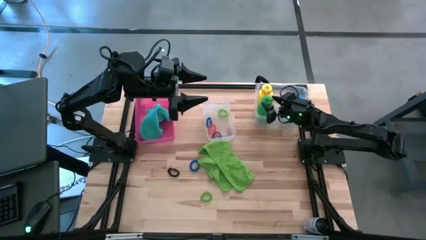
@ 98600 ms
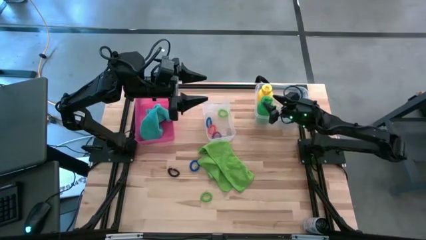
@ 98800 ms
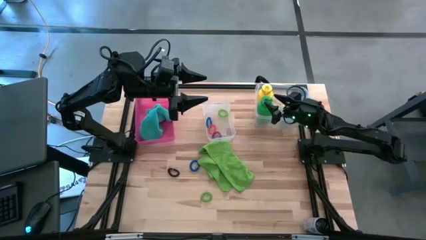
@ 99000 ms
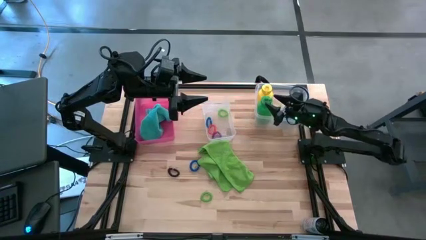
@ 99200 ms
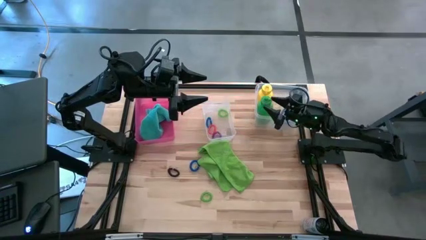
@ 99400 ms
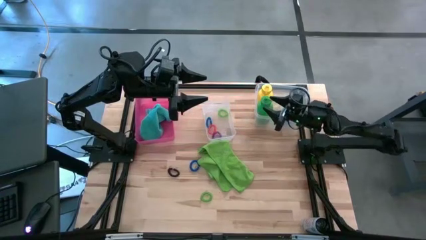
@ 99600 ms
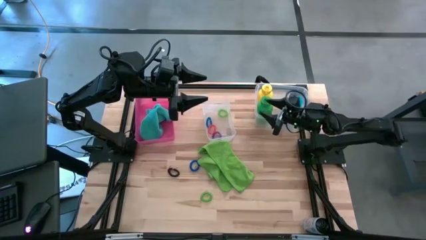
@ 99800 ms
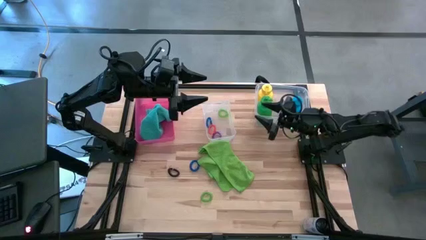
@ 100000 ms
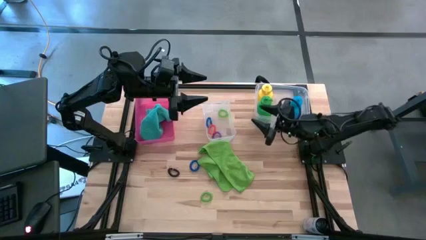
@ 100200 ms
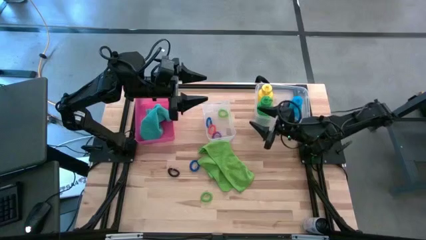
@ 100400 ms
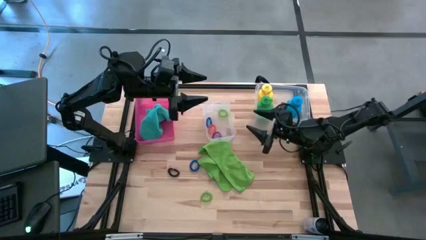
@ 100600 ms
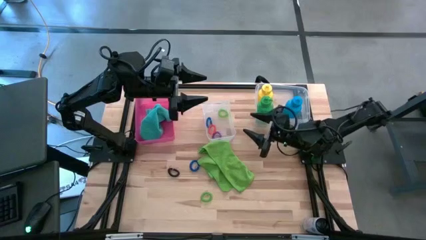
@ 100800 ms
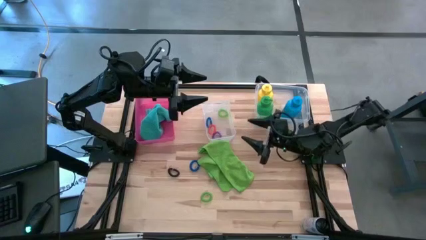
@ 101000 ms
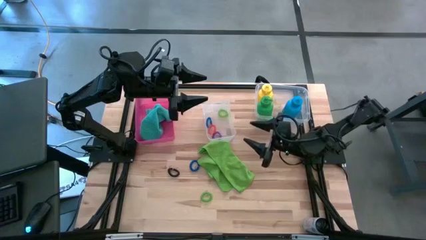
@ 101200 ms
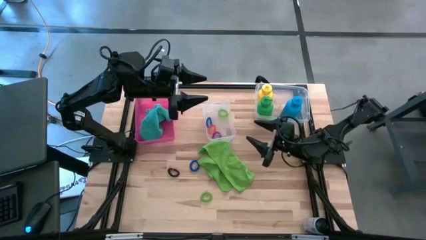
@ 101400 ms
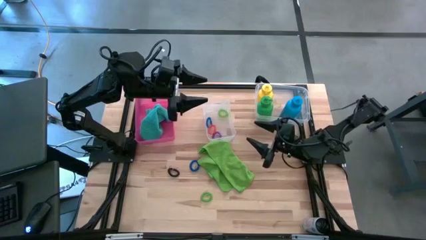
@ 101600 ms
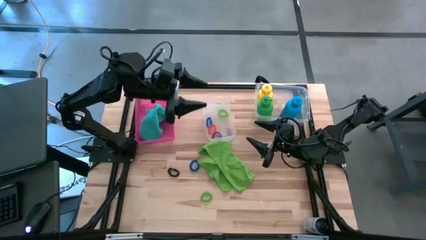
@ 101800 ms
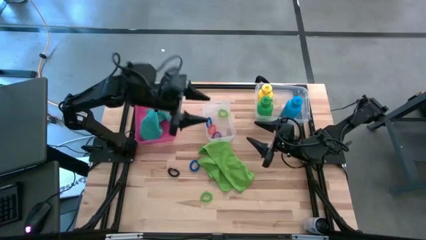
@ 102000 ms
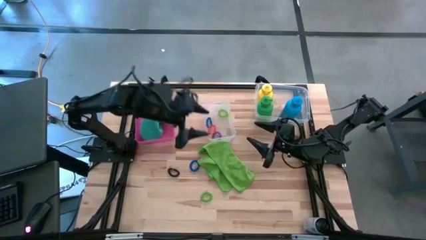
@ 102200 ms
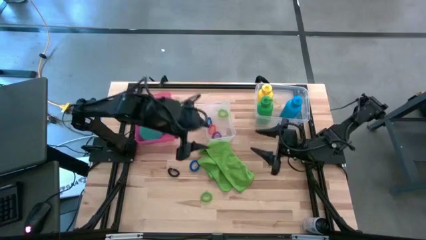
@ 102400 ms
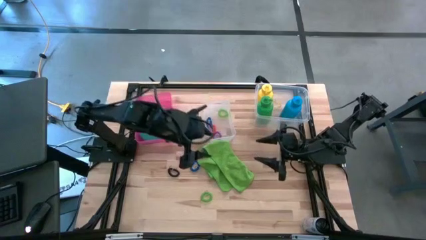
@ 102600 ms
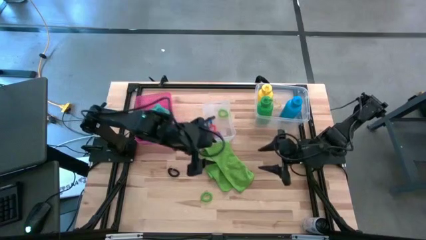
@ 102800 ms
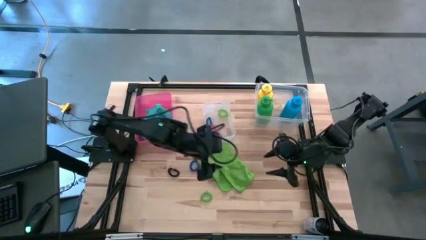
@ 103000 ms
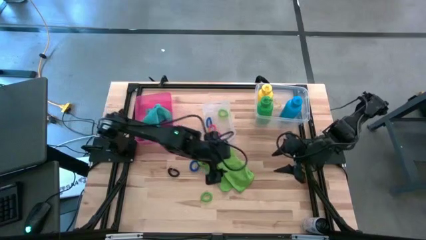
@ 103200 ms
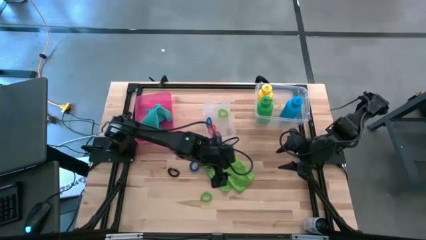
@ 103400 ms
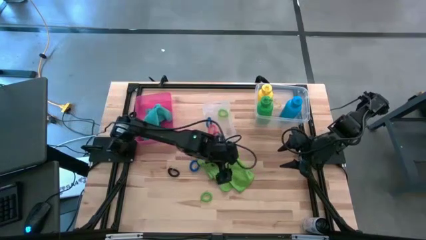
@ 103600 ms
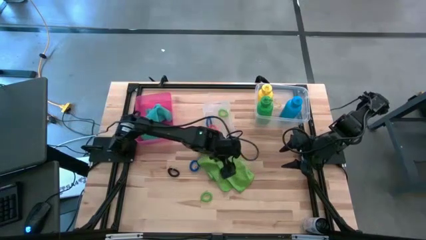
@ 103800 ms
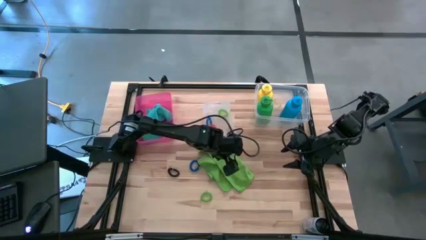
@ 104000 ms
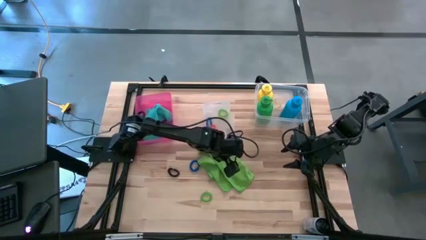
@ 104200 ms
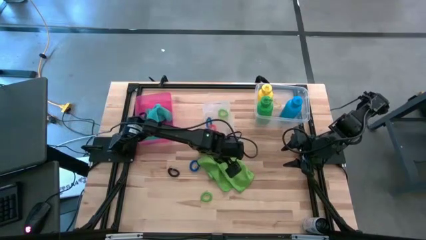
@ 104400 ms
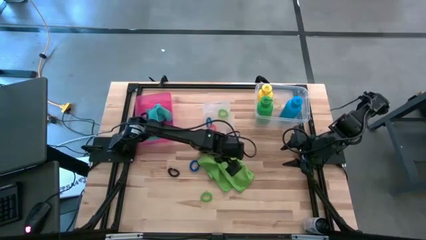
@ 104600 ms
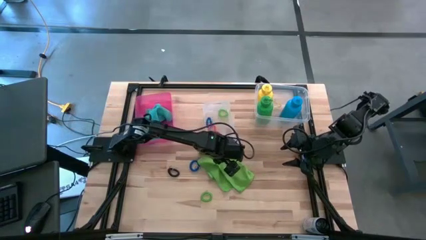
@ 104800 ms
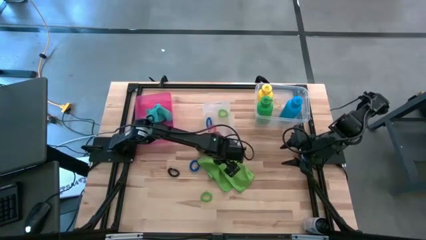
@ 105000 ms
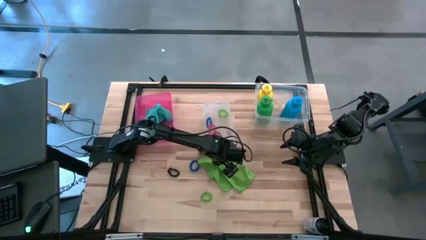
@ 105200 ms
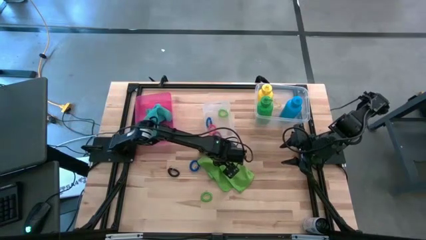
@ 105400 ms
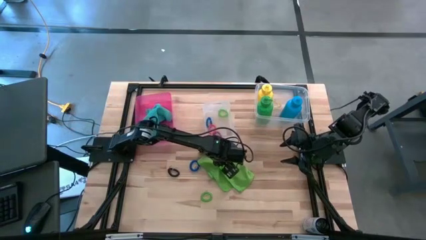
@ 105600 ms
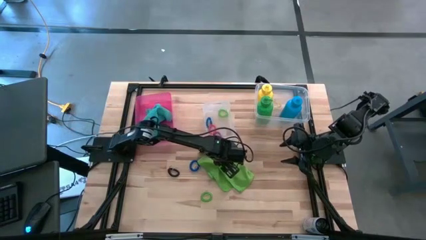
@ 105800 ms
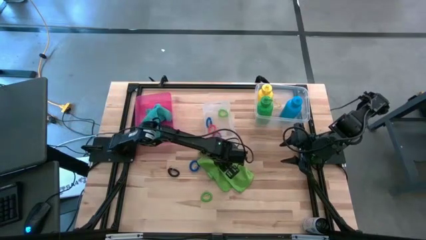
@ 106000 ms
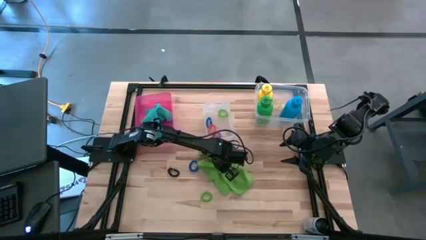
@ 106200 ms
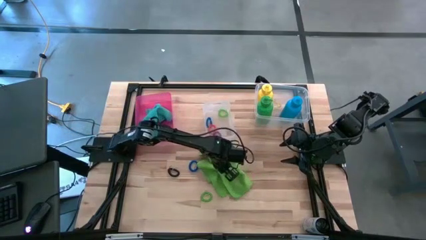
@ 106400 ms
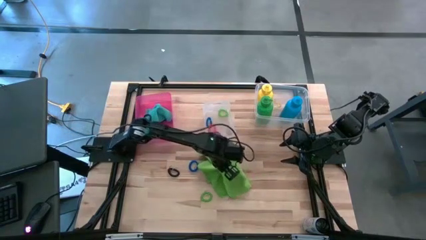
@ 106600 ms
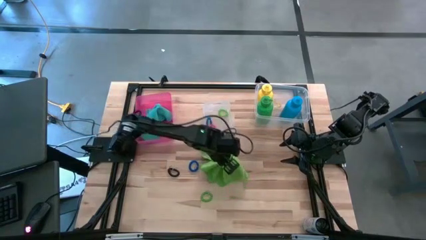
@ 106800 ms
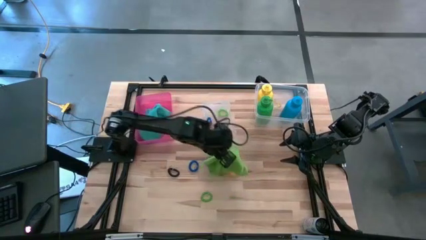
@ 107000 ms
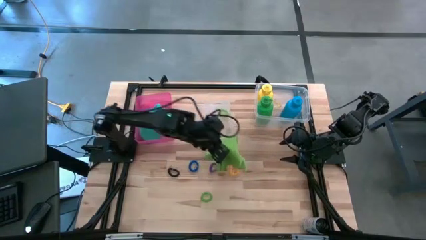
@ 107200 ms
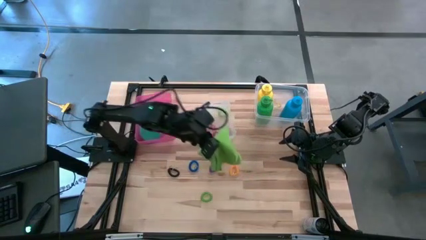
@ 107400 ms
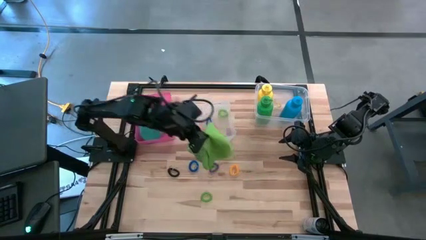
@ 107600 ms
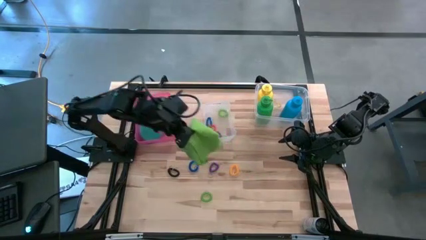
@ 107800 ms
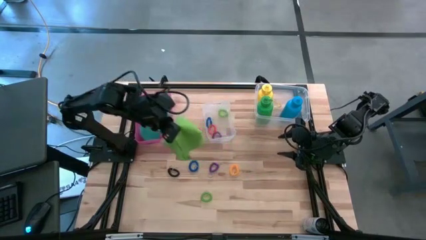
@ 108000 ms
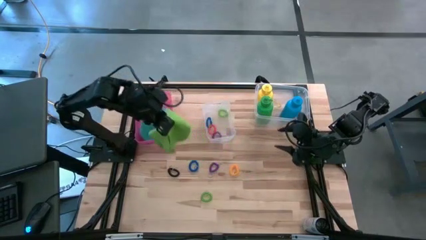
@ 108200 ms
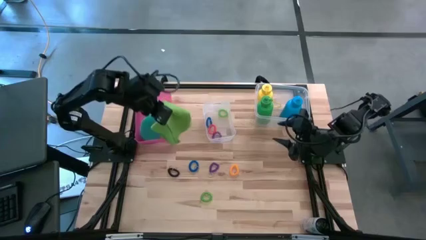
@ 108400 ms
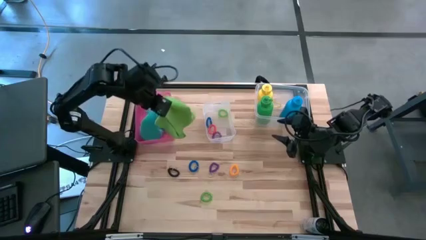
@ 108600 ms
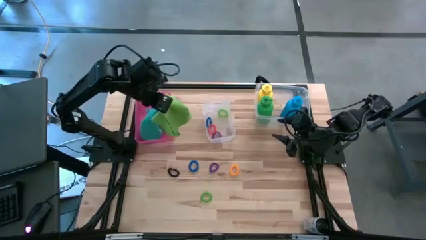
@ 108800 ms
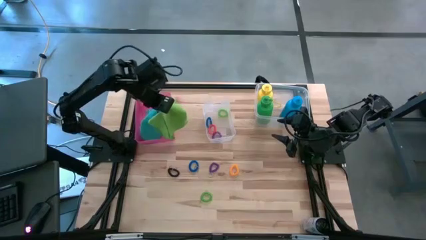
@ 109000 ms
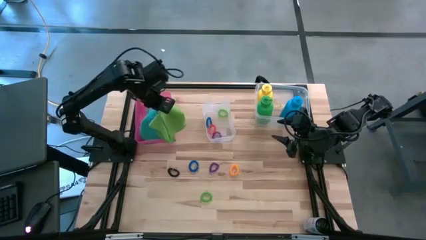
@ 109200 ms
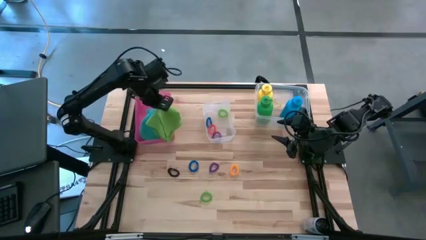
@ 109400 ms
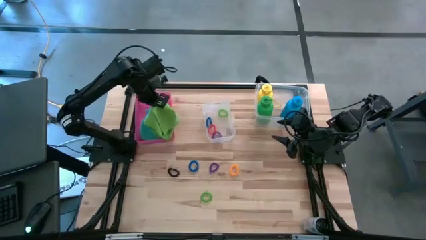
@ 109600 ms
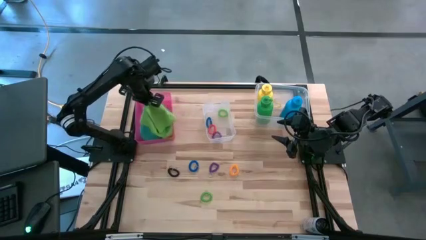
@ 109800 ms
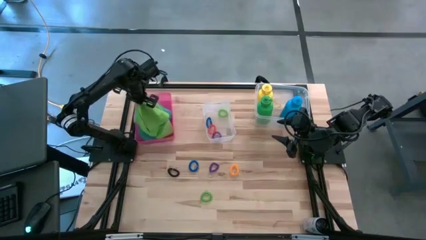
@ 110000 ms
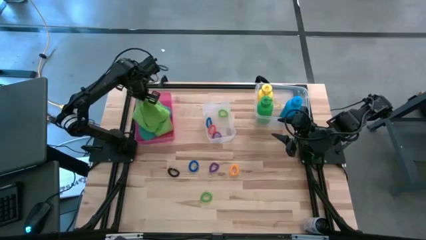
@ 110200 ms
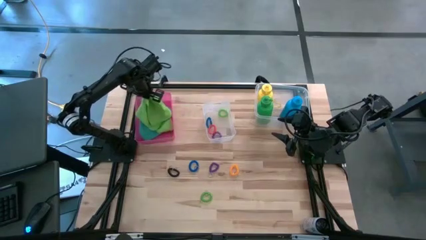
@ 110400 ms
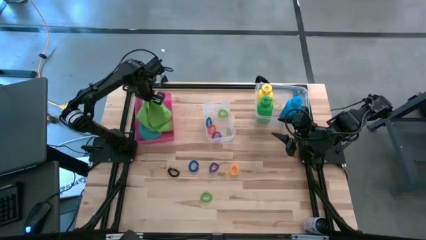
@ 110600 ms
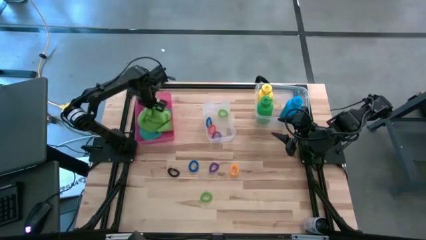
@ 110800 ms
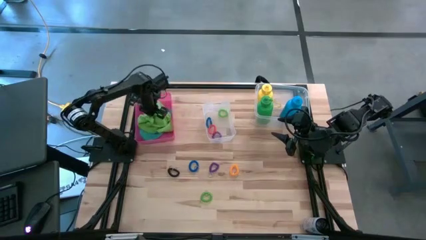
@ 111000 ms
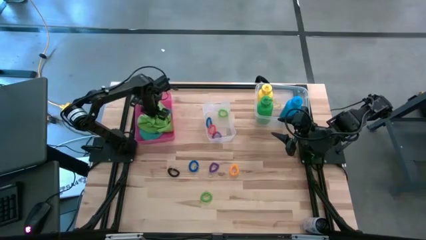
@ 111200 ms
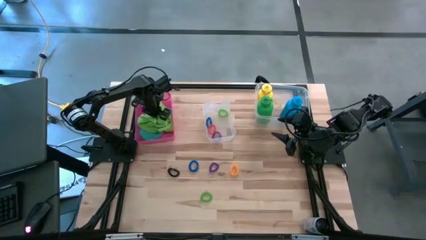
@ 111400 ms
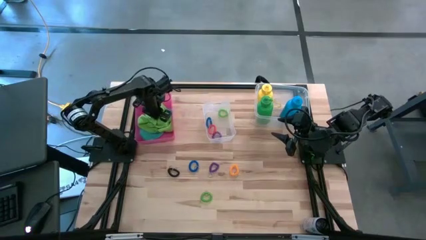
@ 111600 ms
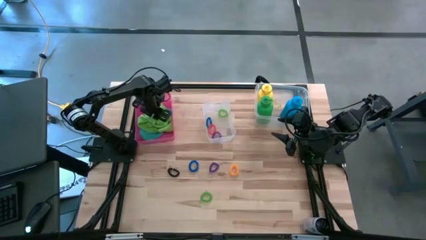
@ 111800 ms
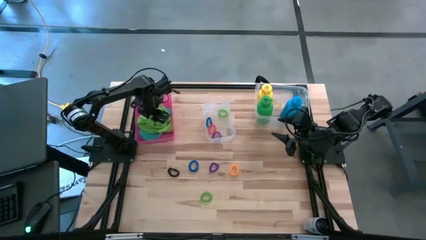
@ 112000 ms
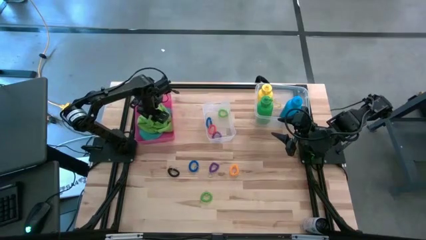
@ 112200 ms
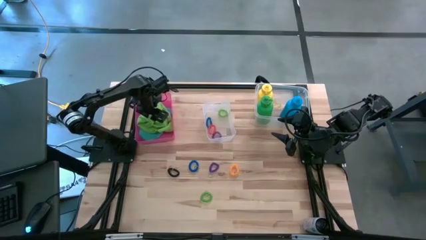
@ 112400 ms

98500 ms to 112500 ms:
Task: Pick & Place Sports Items
Put the green microfiber towel into the red bin

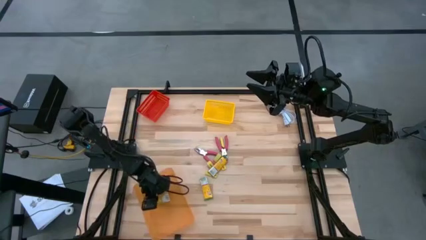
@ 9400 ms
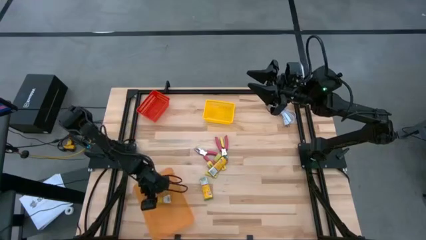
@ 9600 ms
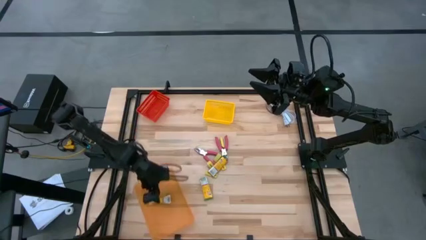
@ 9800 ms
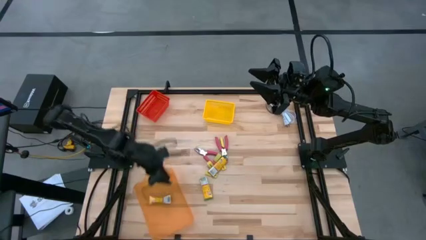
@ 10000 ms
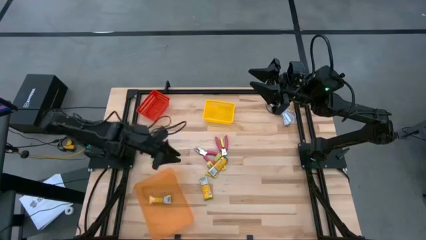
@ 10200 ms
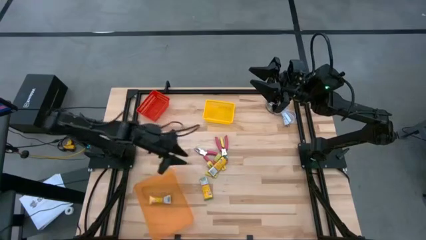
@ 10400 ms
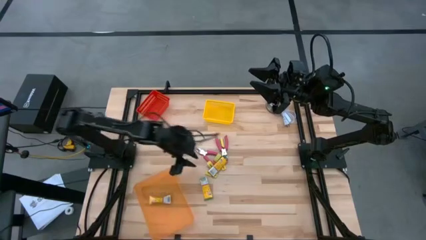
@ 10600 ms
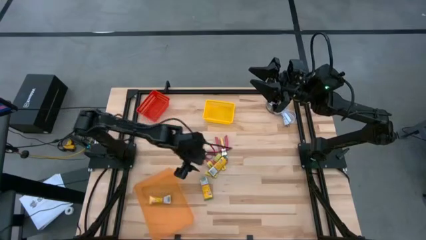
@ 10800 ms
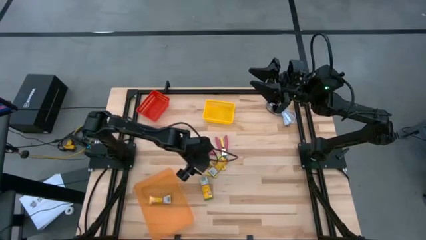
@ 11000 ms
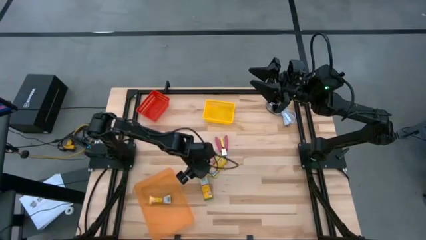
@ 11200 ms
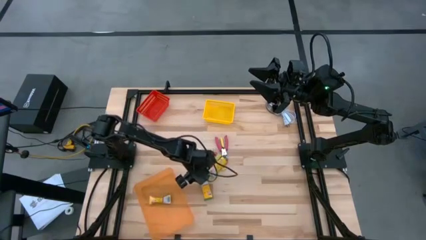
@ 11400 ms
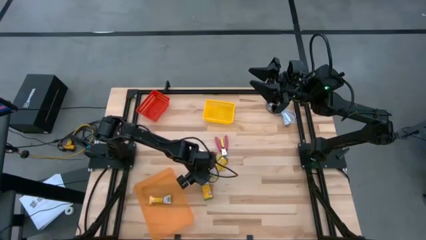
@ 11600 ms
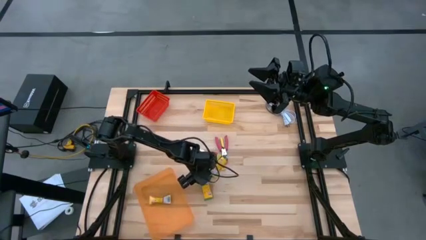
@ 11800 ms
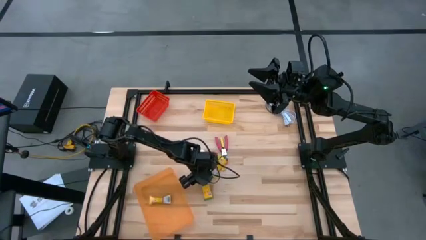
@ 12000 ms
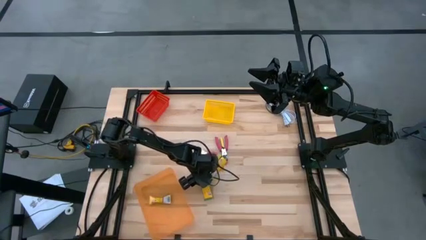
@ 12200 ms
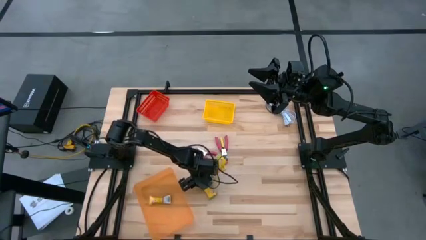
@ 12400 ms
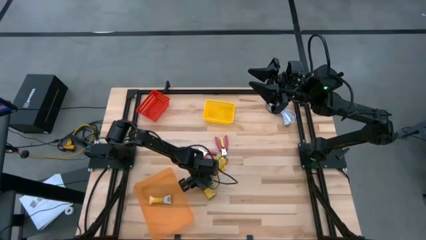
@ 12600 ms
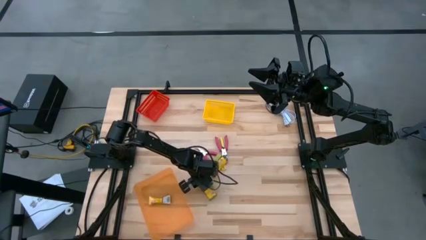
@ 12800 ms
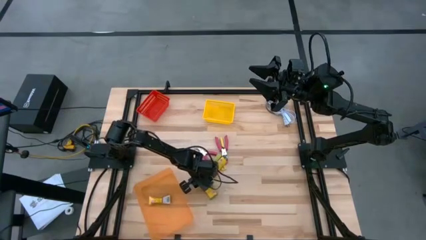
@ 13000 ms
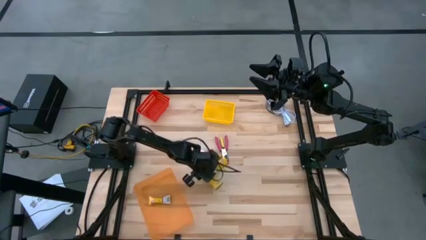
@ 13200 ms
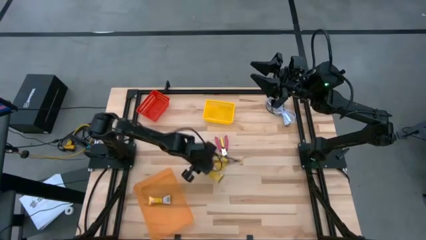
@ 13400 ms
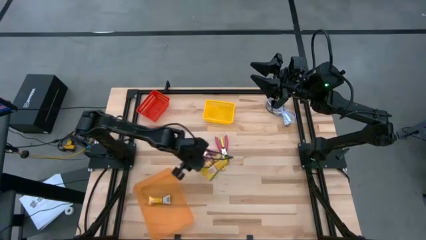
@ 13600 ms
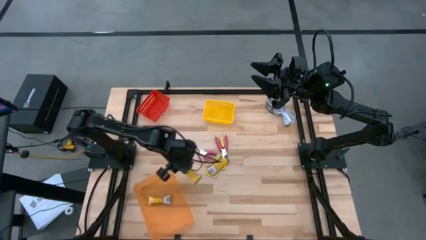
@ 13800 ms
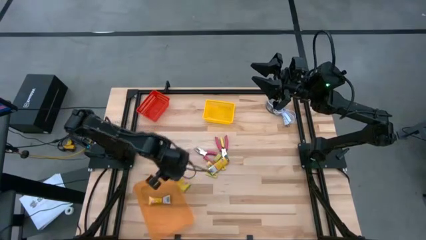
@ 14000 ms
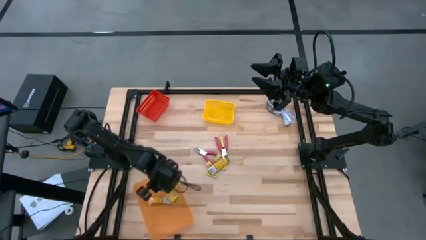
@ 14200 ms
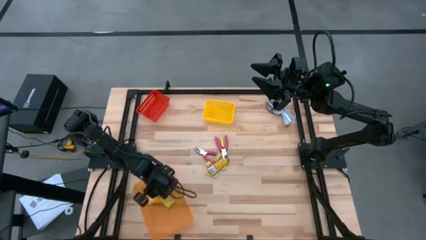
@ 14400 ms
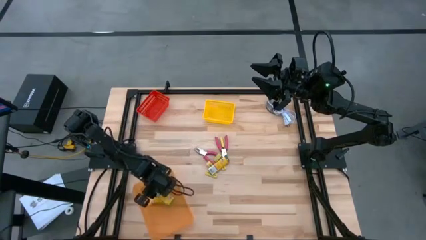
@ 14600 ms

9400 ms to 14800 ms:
Task: Pick & Place School Supplies
Put the yellow crayon box into the orange bin
